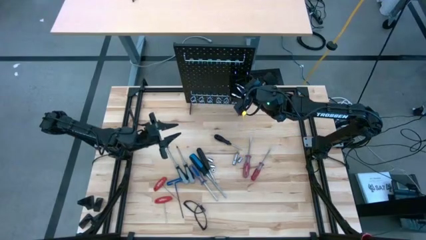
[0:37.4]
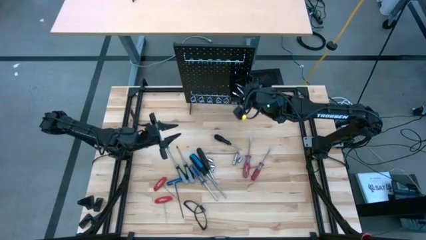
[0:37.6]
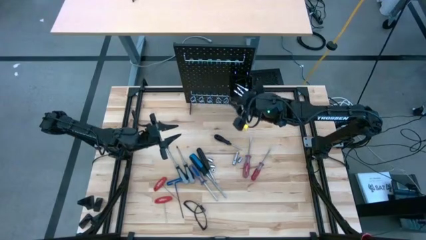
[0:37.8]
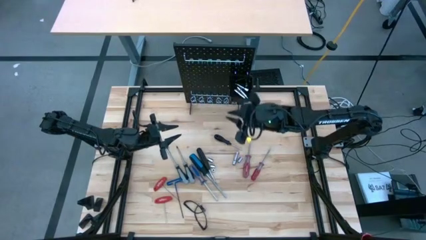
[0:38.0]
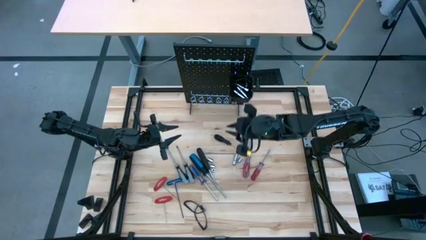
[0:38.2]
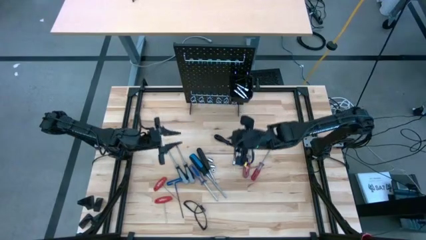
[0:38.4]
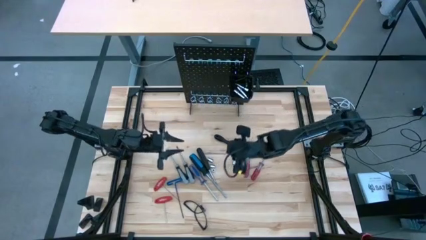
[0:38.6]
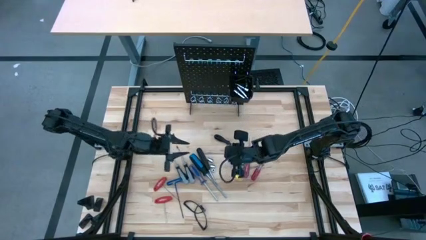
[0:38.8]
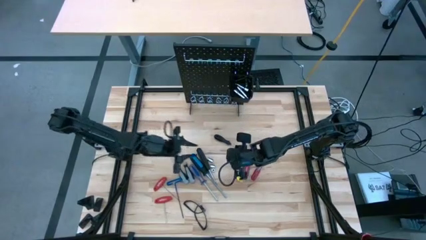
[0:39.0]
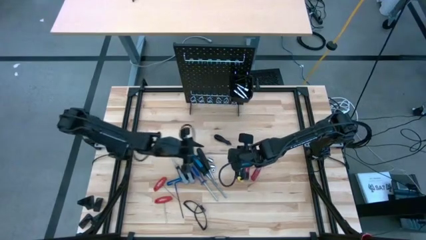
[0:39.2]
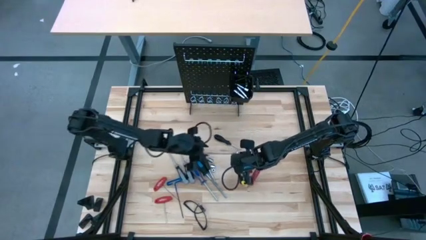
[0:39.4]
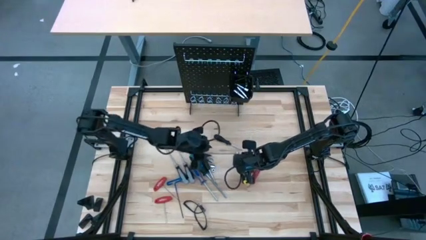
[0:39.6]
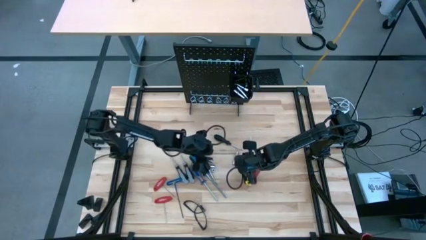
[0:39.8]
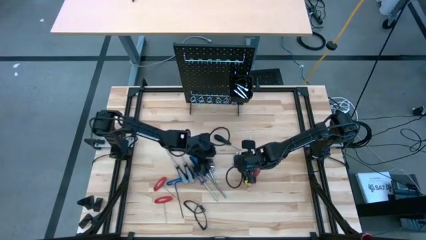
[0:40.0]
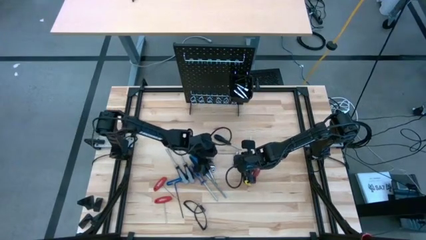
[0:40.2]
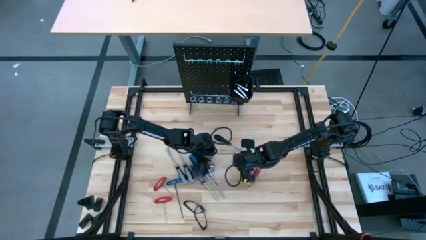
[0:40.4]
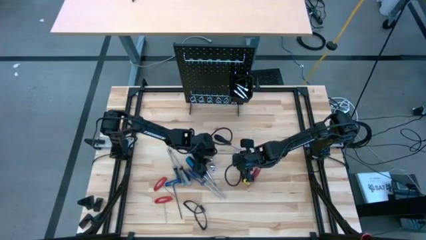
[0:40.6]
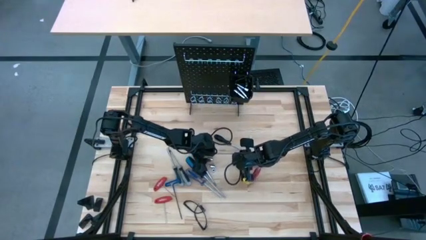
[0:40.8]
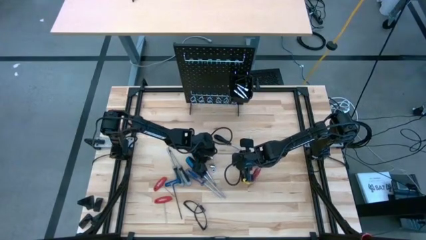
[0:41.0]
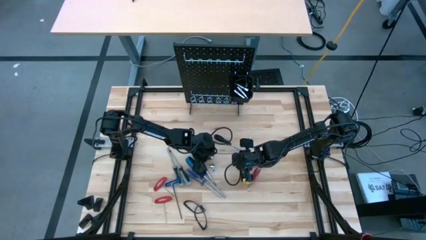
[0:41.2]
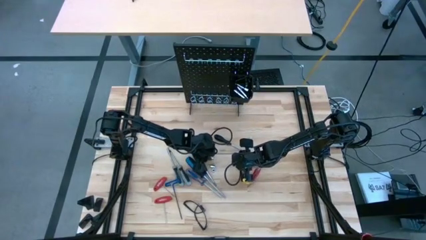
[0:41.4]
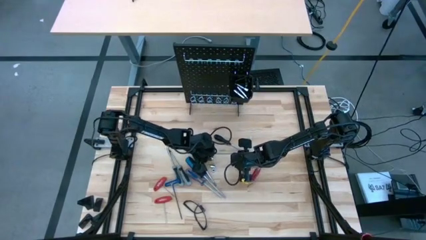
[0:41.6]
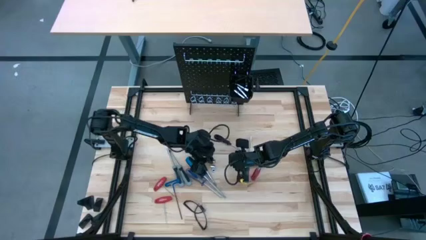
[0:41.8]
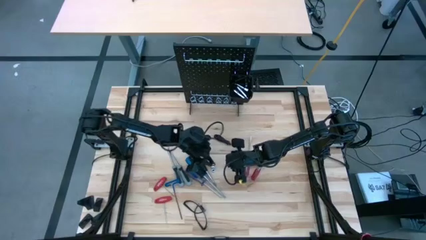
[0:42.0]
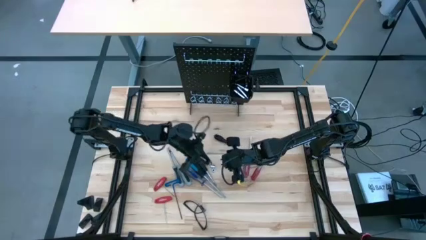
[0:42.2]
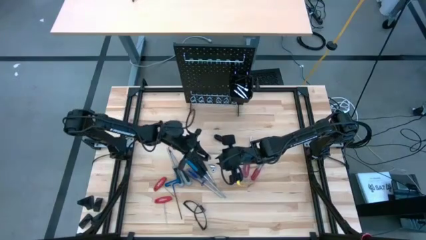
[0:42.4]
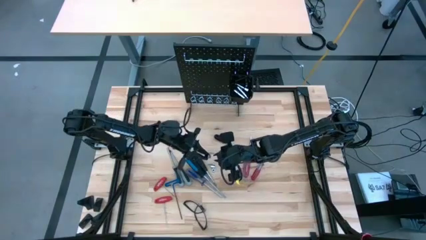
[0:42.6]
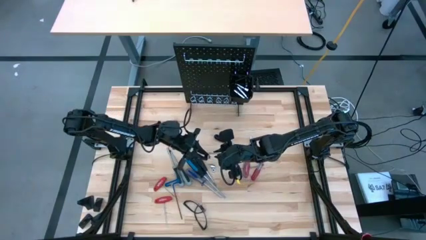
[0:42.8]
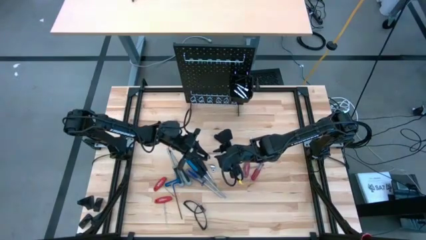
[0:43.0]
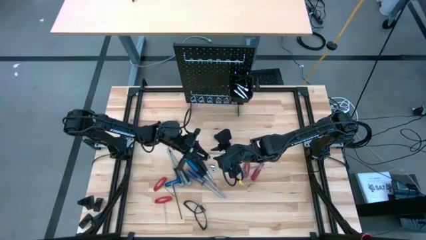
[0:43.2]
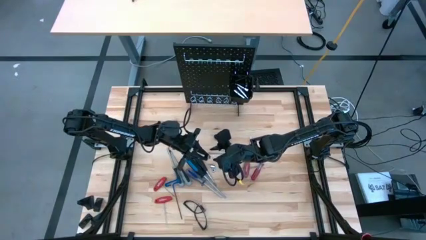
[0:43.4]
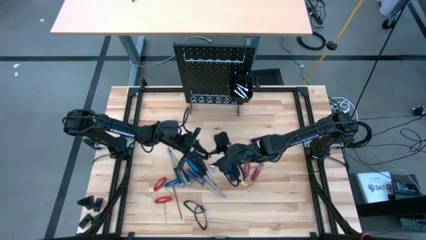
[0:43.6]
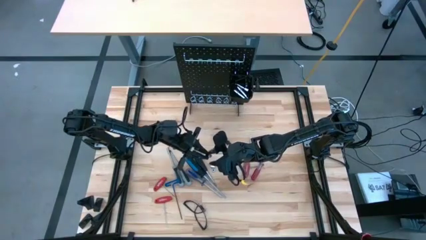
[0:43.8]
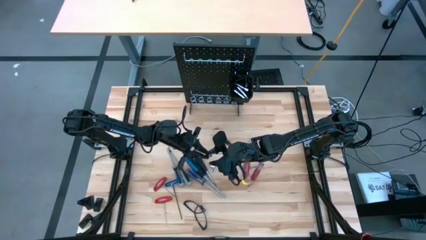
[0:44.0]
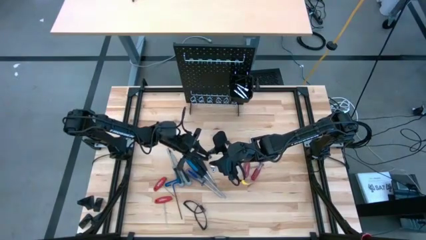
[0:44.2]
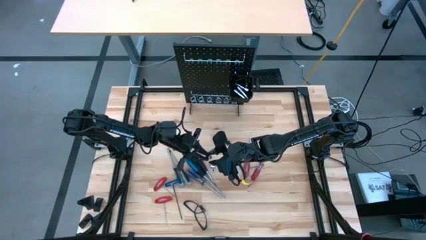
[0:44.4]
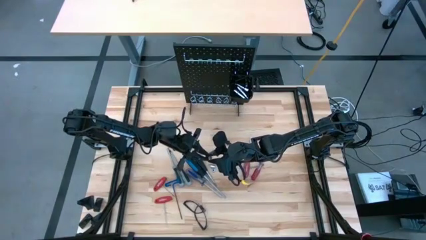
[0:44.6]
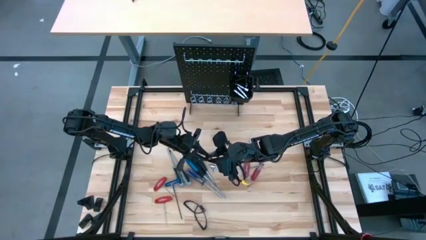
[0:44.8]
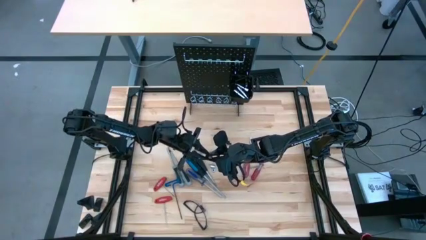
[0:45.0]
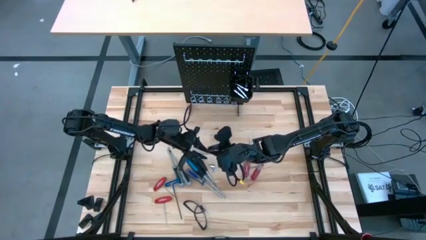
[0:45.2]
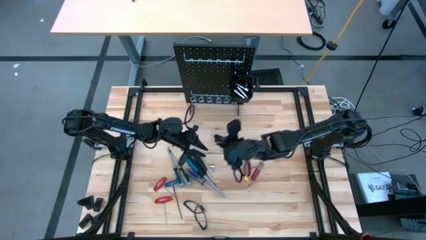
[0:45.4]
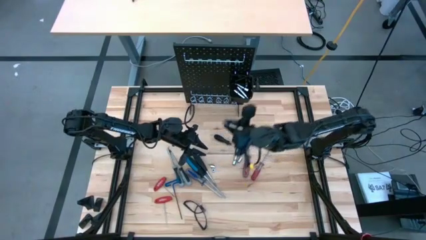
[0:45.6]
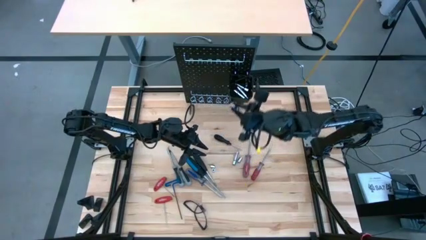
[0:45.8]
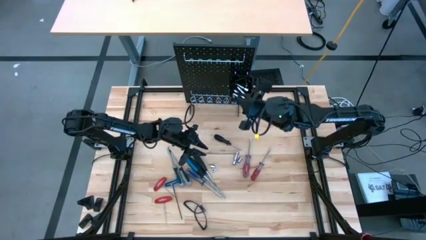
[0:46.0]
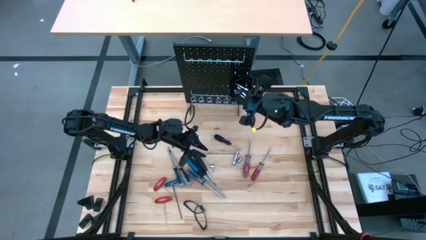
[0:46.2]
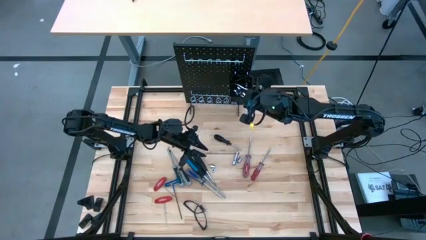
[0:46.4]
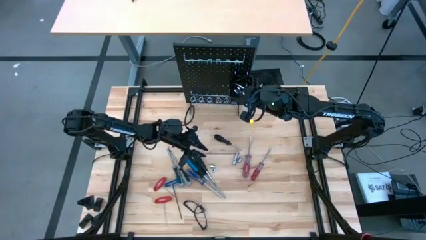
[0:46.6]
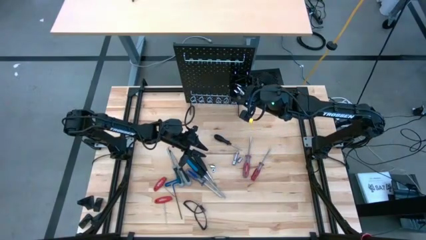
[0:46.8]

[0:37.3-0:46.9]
Task: Hang tools onto peg board
Put the socket into the black bin on the pegboard

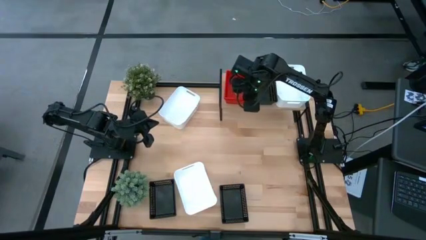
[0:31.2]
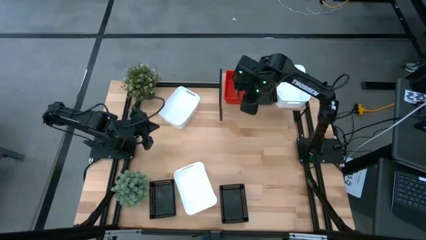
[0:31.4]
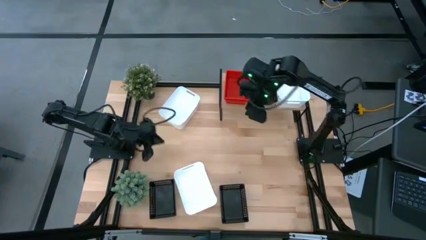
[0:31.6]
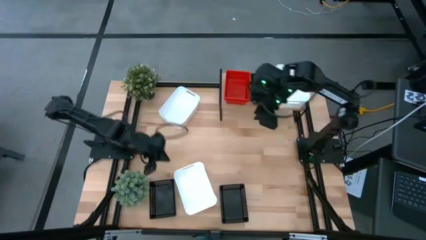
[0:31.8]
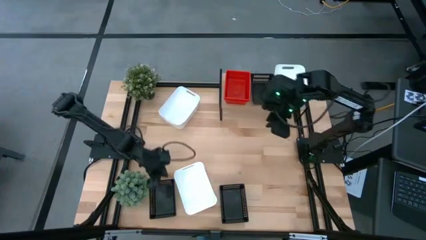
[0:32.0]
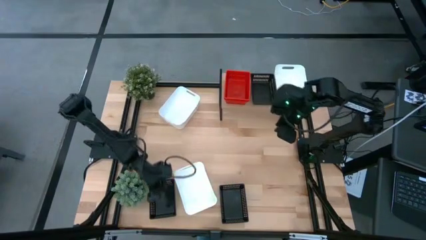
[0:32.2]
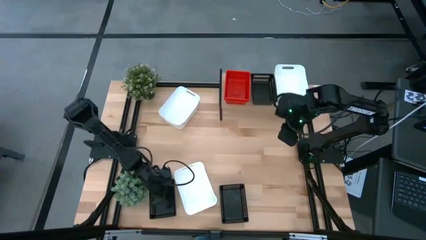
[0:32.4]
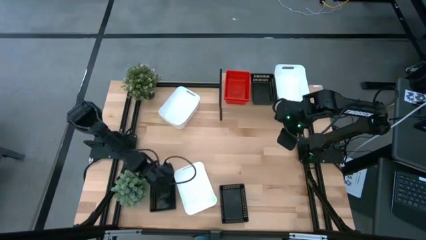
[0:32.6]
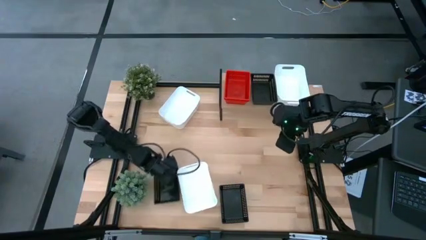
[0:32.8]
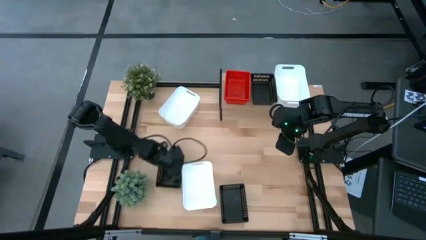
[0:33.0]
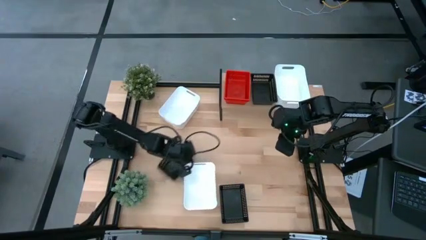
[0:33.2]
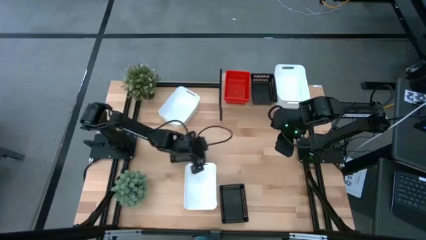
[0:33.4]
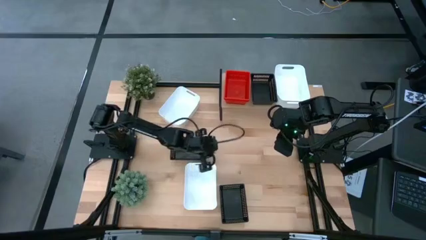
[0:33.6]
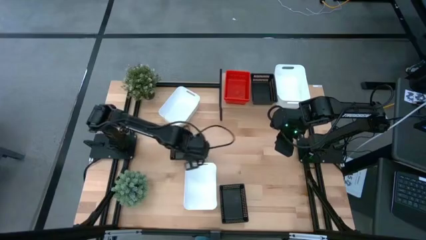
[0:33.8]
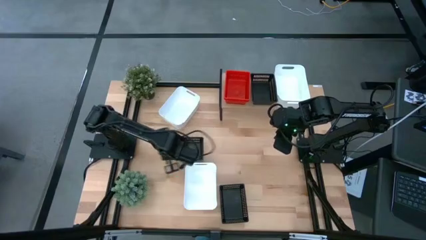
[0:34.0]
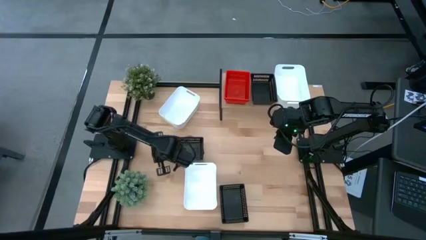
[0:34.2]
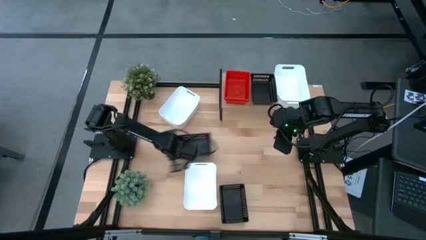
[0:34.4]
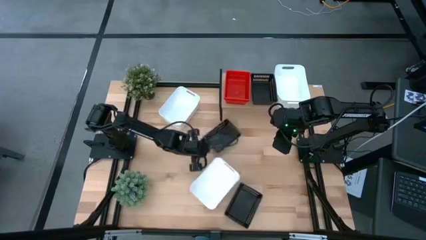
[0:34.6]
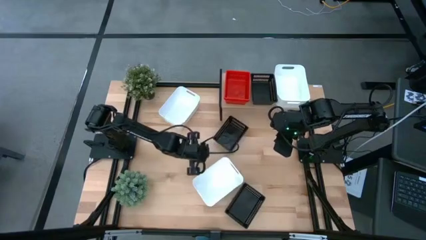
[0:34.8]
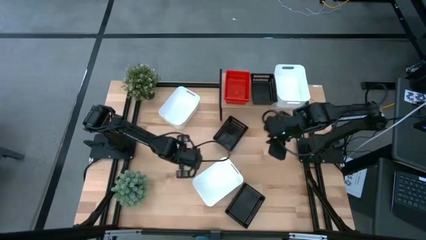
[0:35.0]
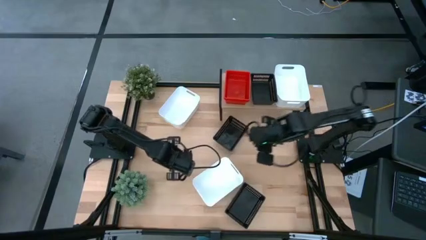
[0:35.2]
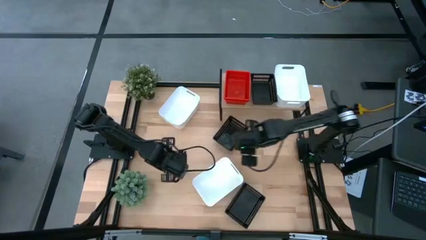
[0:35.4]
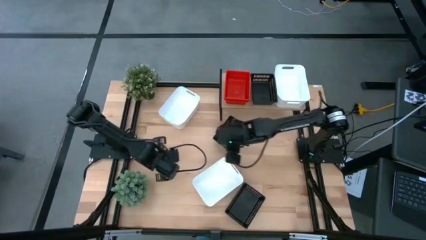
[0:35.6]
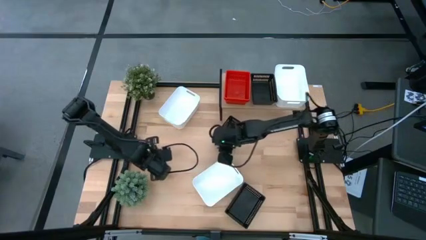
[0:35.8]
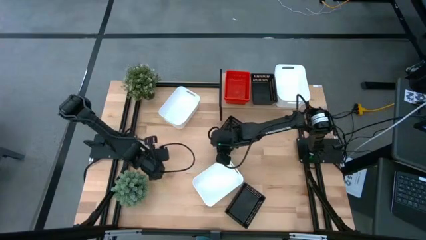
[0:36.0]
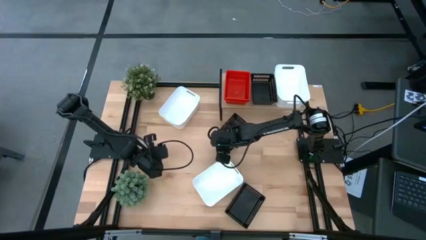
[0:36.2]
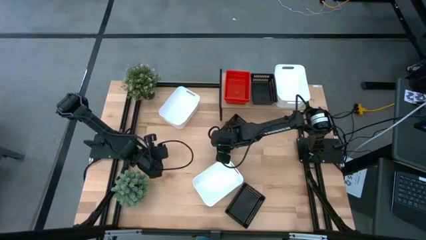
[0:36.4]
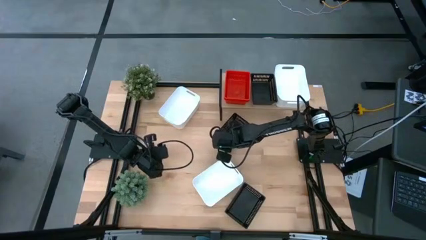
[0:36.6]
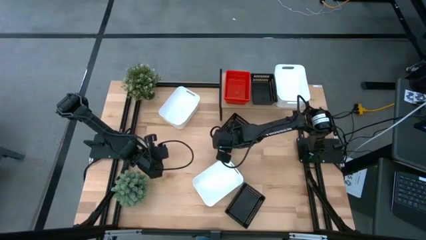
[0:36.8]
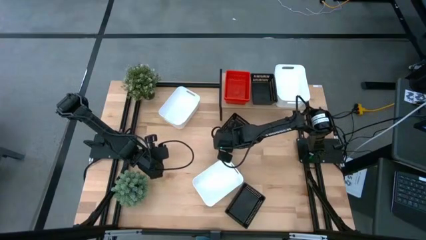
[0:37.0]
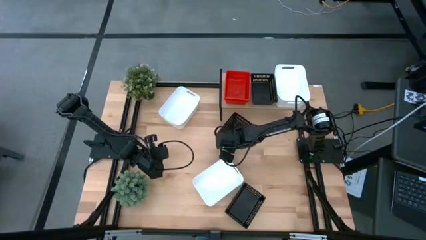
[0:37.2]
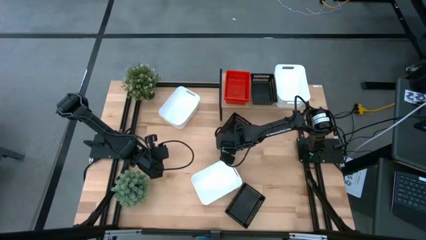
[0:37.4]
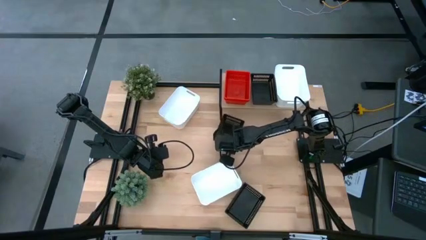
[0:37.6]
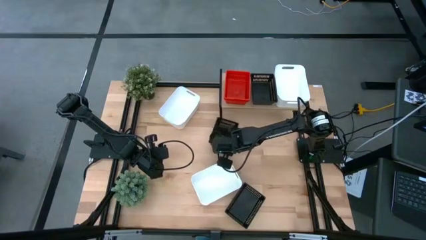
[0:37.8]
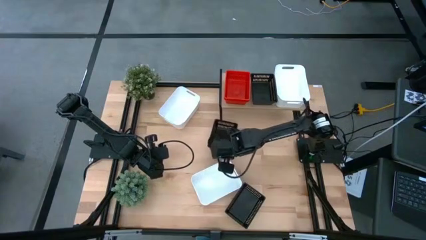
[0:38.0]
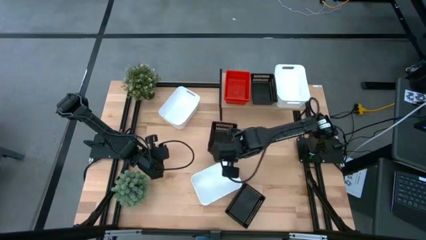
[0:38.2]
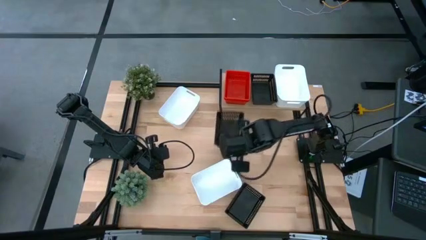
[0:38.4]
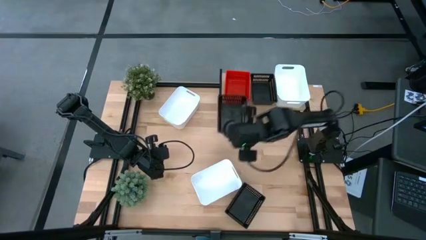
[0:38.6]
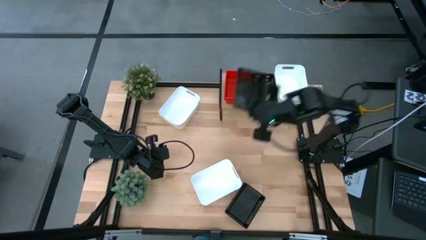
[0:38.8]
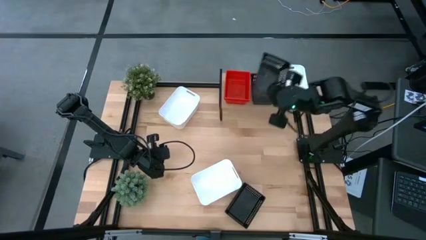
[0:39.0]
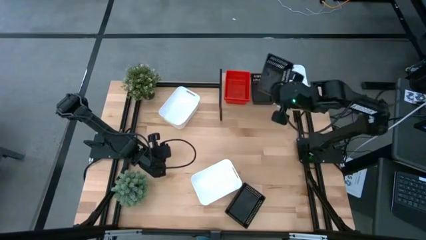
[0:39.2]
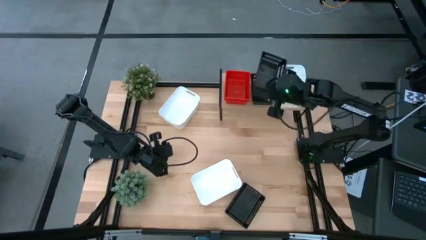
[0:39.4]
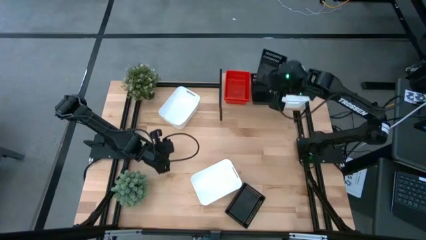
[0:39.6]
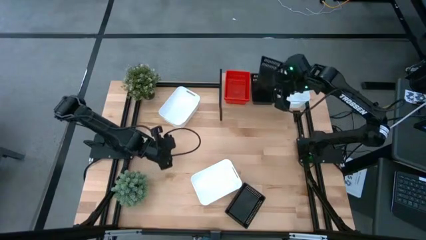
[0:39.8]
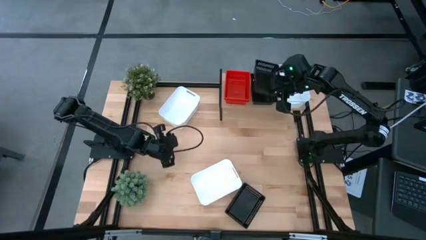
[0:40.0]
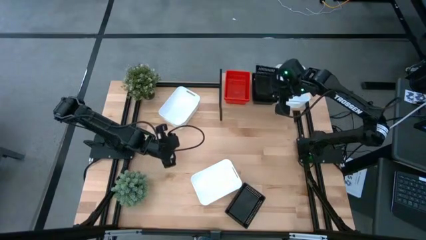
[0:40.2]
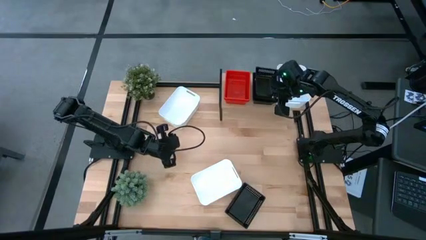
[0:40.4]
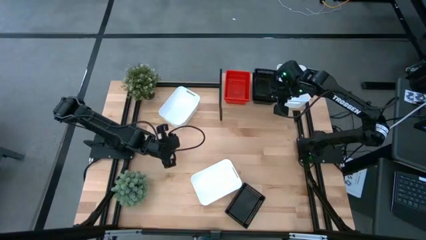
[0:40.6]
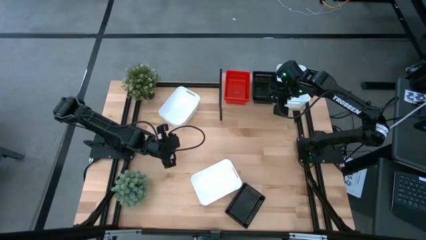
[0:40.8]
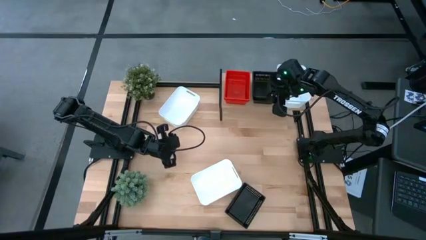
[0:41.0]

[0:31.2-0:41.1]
Task: Stack baskets on shelf by color
Stack the left black bin on the top of the black bin on the shelf
